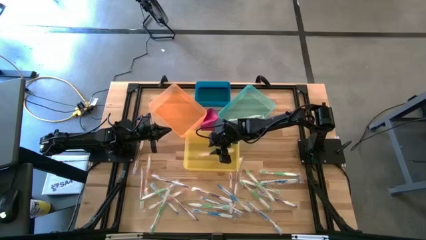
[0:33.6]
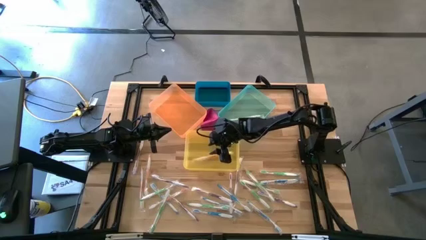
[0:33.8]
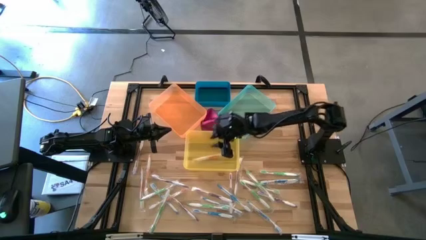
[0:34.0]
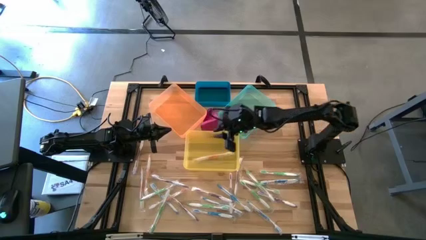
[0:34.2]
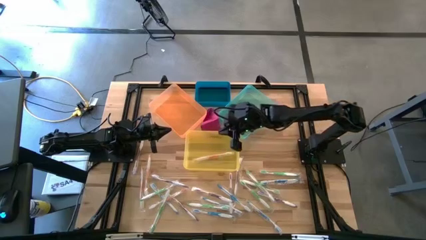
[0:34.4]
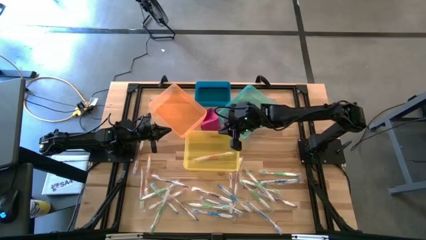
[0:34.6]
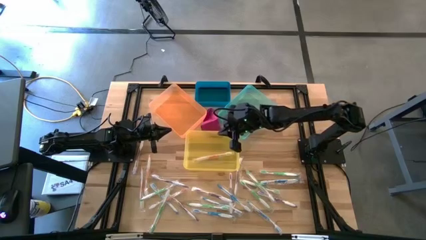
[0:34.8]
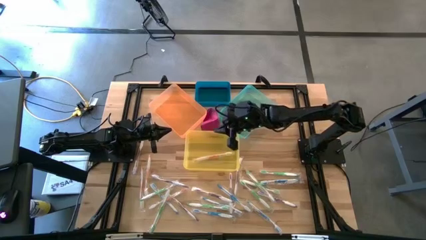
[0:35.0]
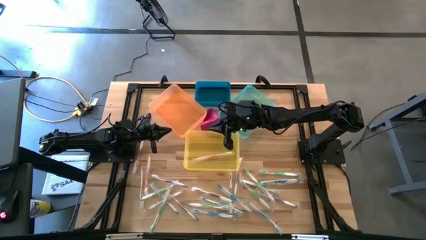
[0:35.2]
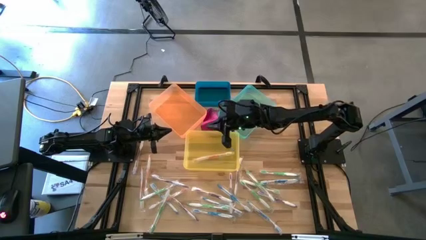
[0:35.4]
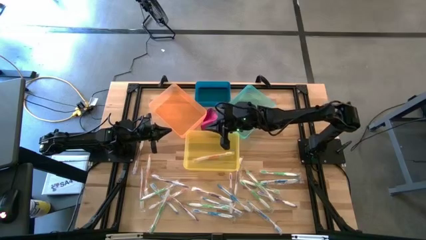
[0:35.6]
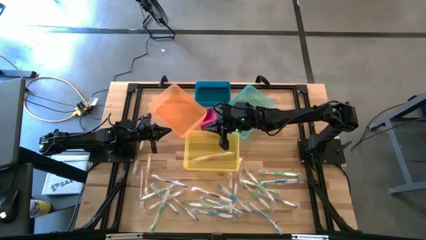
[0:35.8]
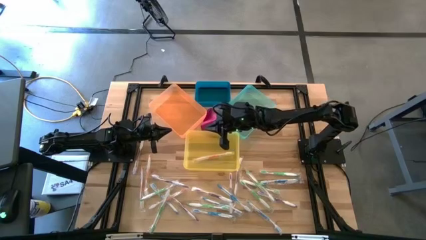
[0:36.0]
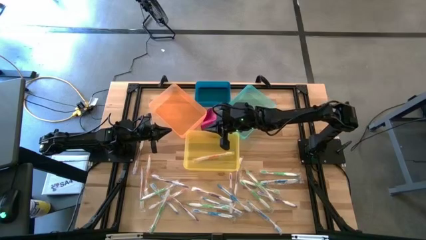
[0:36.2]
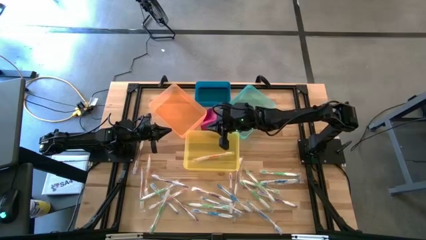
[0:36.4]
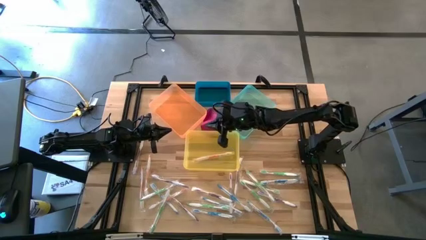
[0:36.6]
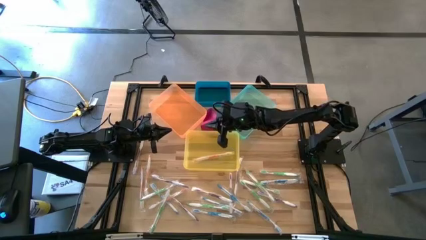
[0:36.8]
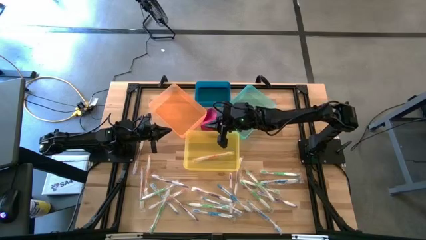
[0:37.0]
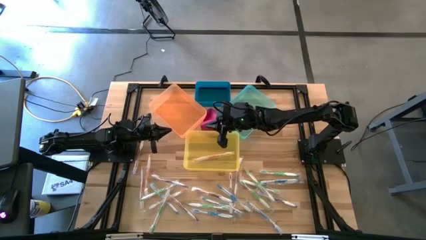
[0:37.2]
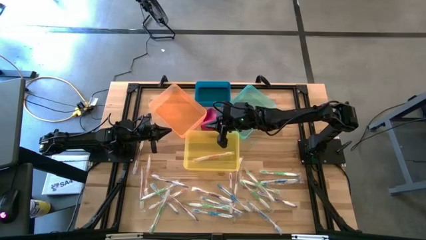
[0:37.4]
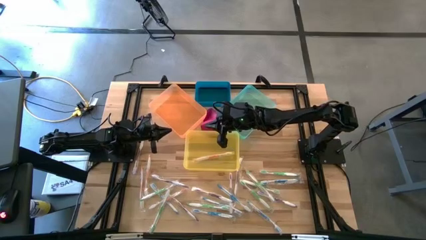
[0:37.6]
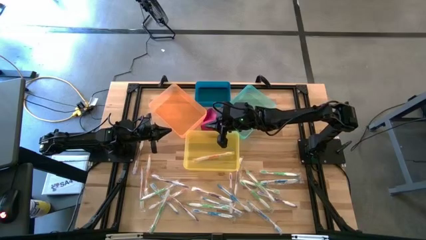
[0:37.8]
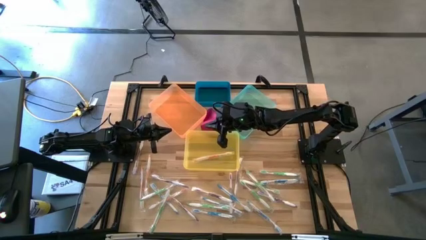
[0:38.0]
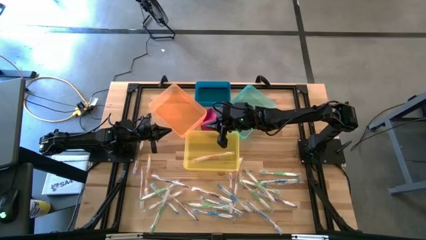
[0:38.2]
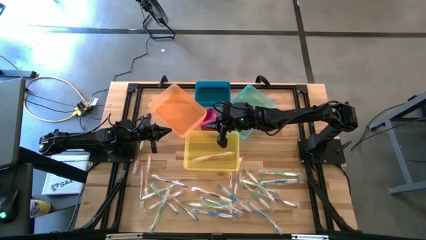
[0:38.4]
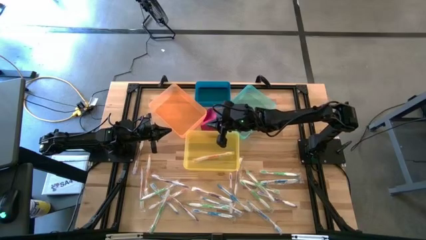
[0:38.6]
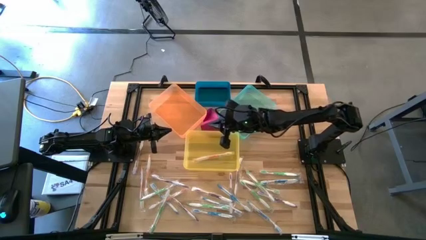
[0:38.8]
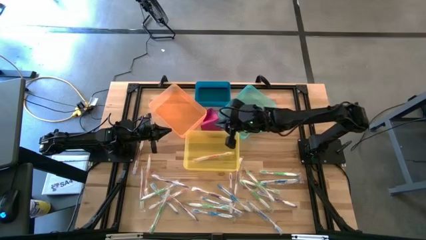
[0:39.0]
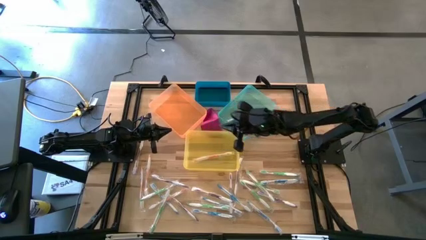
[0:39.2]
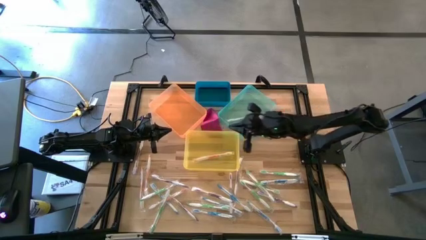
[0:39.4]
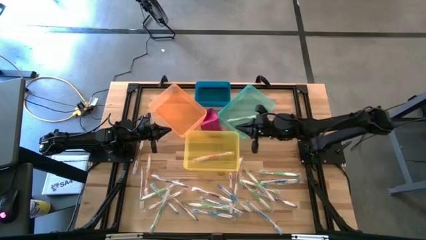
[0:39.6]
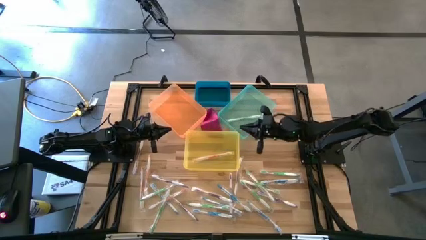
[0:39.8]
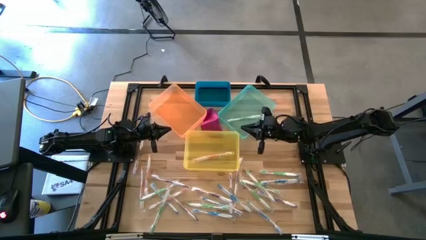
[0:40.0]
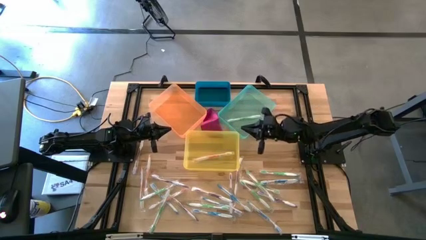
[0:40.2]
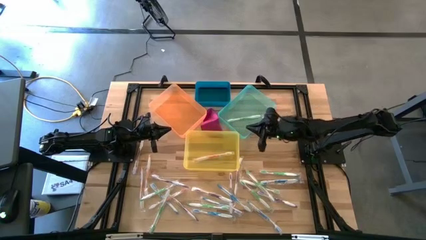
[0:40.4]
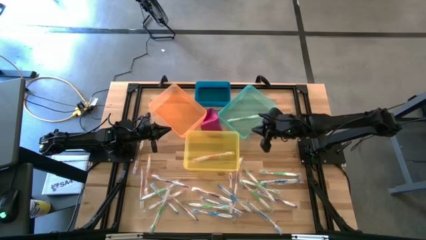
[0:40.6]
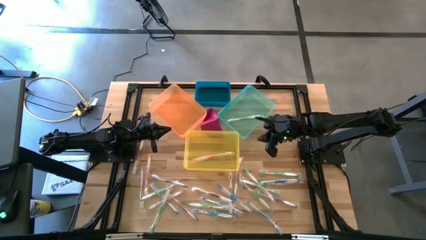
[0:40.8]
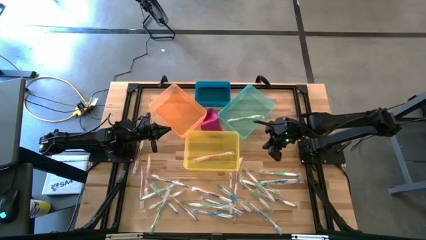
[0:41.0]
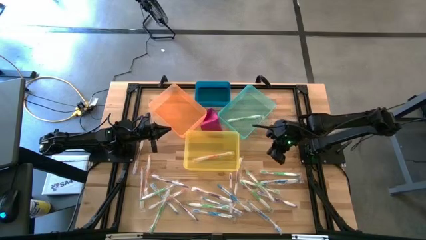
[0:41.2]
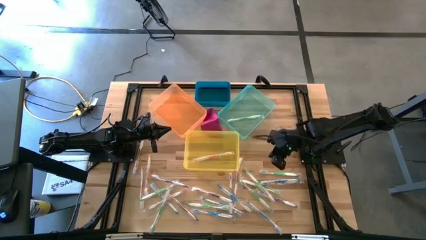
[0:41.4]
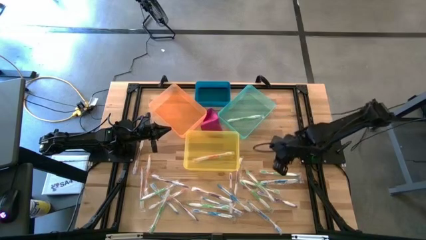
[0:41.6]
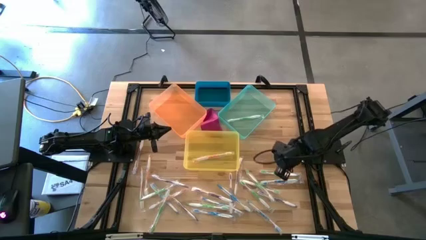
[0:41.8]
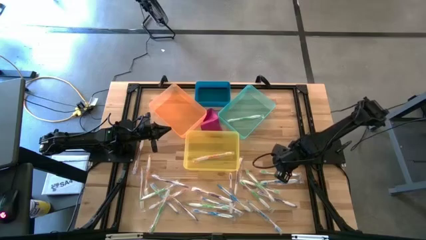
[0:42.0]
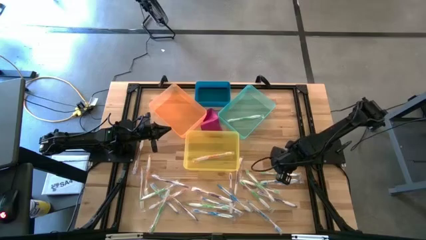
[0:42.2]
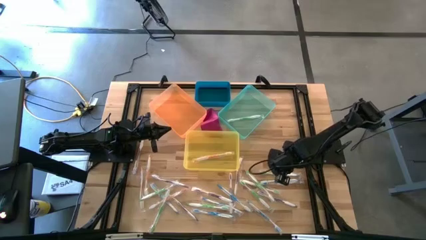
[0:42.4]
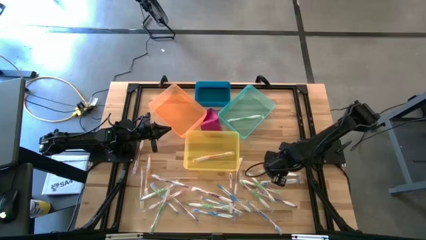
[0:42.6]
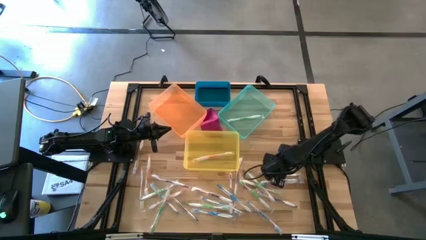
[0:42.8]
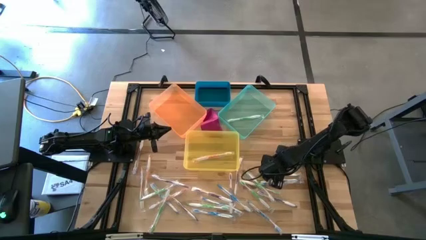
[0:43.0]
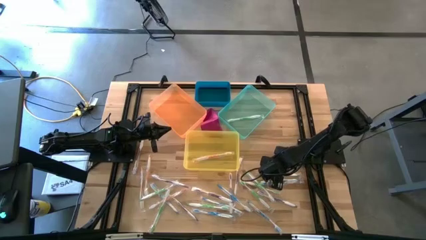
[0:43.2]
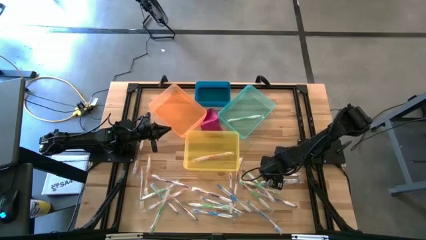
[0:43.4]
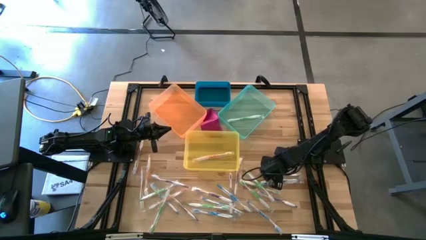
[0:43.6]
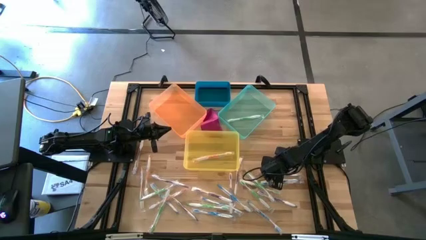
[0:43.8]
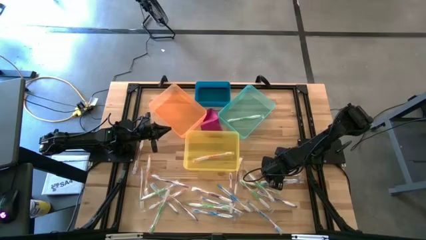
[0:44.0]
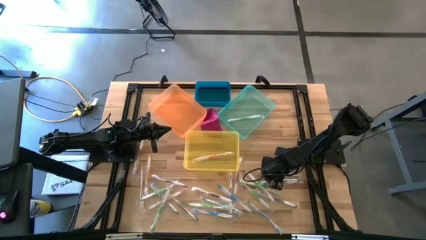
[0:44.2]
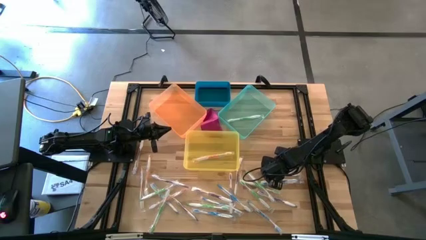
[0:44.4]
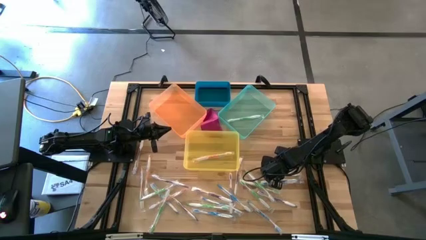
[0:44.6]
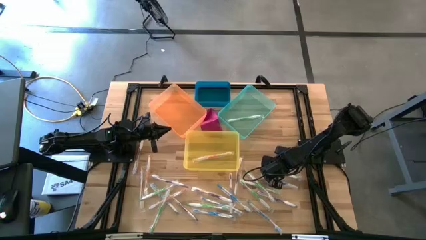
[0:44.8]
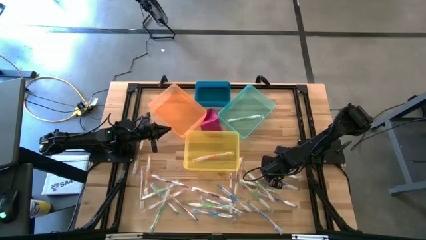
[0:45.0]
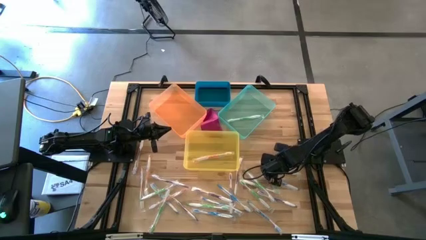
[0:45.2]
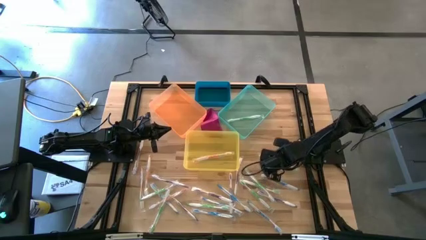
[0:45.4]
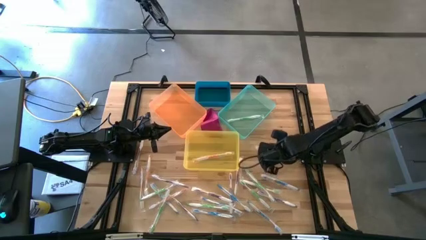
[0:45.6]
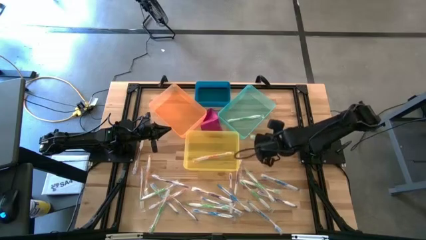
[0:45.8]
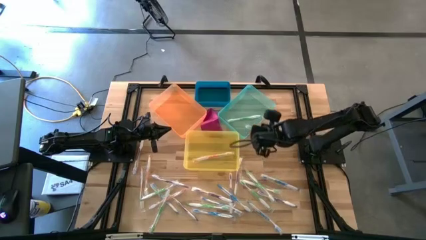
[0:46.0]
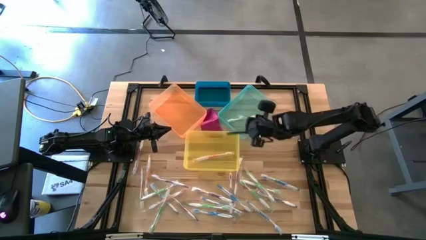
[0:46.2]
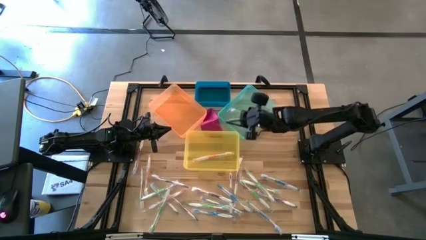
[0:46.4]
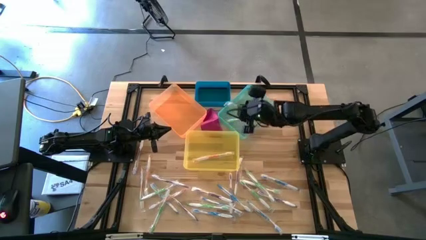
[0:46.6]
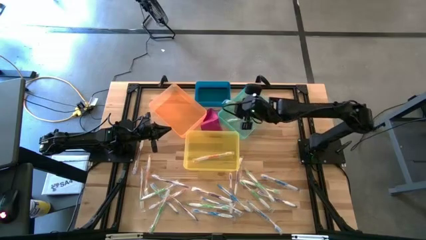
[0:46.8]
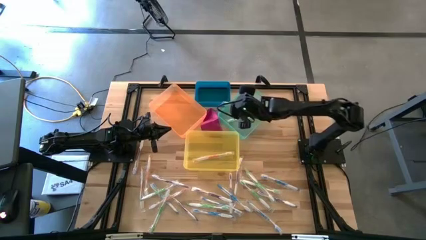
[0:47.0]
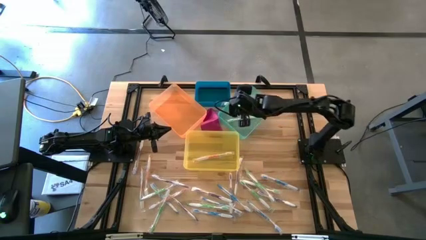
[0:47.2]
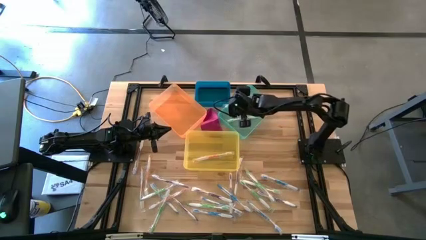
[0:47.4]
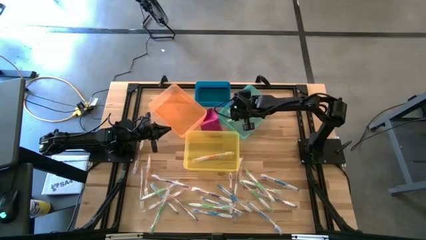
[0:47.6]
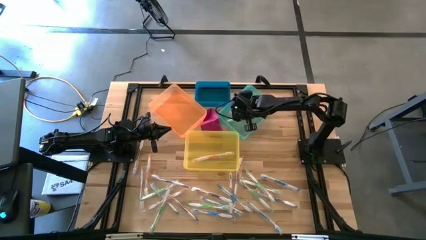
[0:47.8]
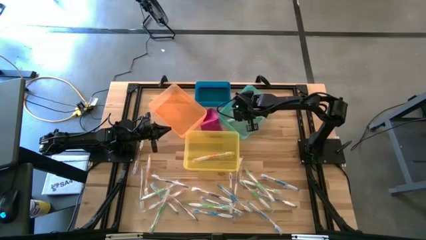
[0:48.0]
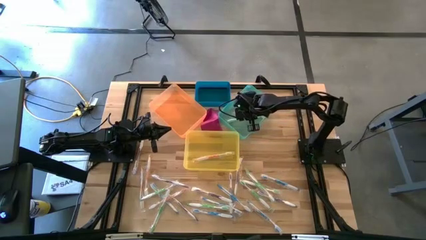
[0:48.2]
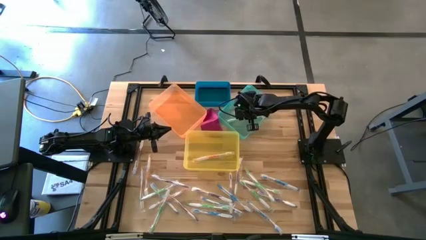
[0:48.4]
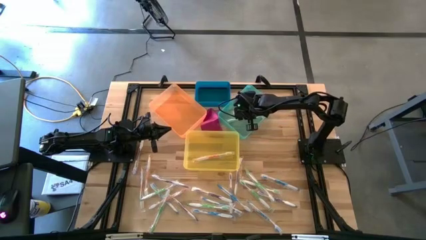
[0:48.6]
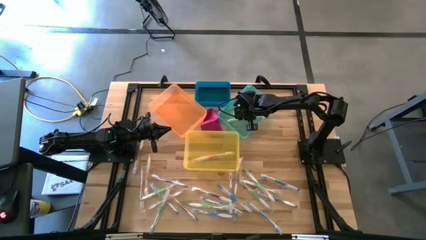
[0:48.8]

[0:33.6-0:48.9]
Task: Pick & Place Toothbrushes
Put the green toothbrush into the green bin
